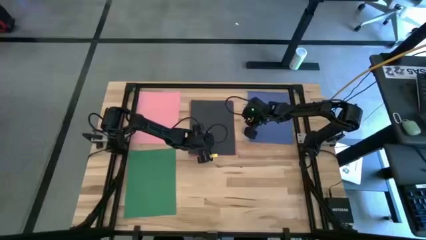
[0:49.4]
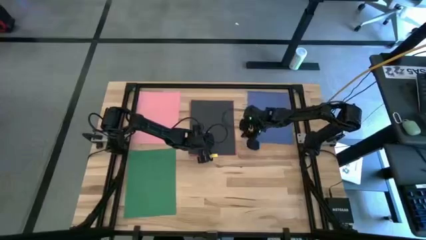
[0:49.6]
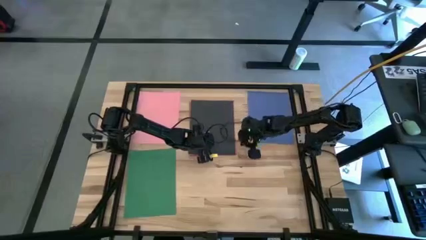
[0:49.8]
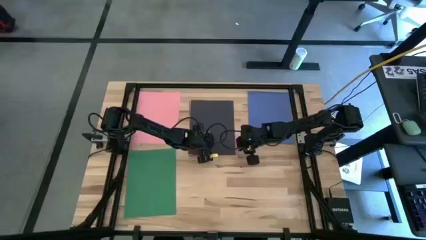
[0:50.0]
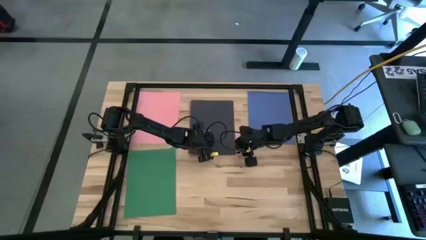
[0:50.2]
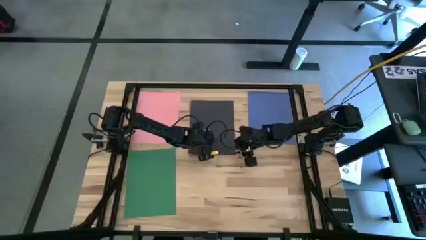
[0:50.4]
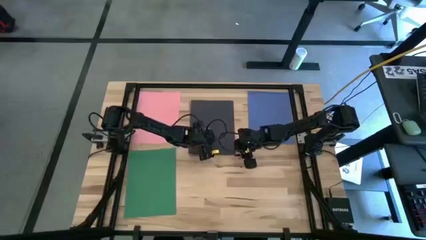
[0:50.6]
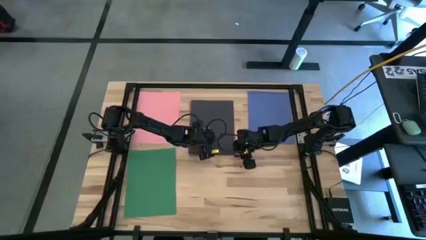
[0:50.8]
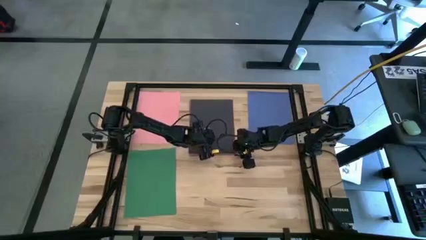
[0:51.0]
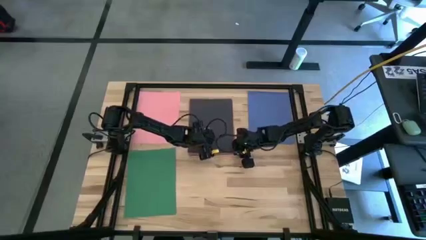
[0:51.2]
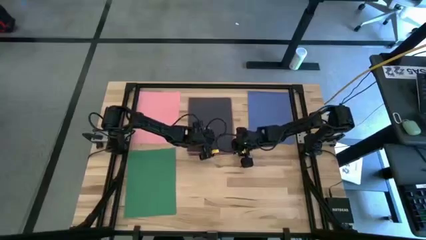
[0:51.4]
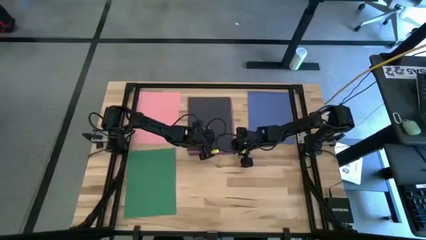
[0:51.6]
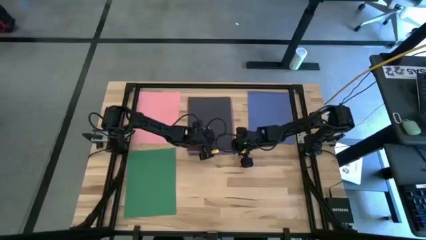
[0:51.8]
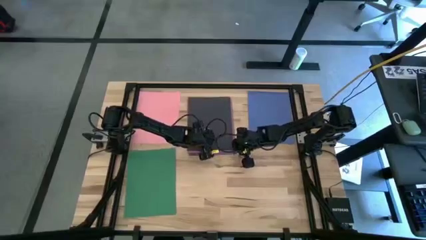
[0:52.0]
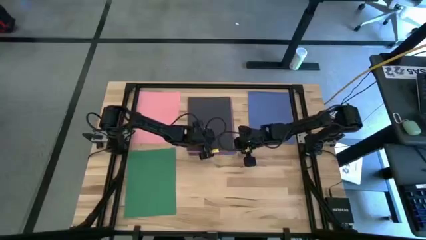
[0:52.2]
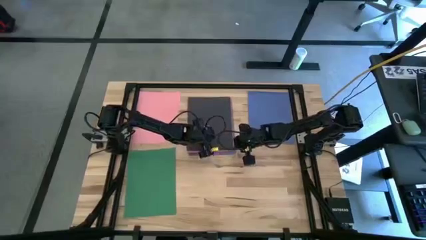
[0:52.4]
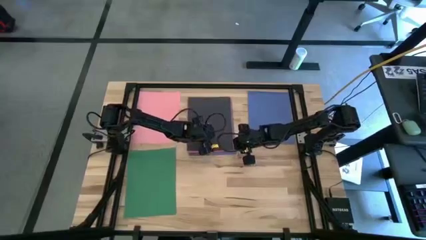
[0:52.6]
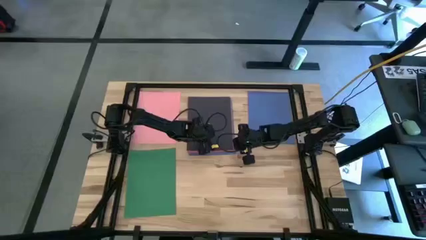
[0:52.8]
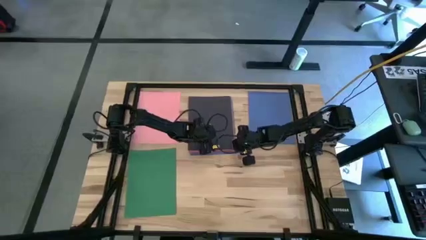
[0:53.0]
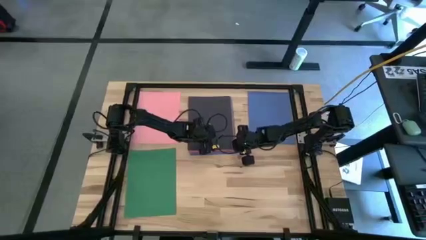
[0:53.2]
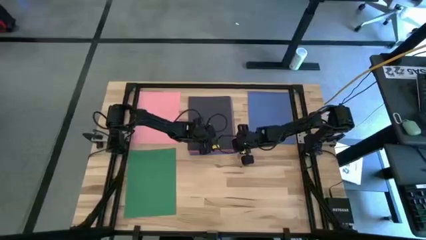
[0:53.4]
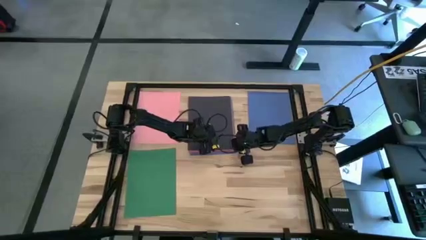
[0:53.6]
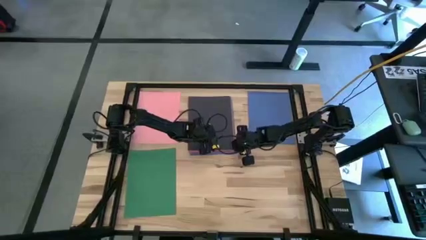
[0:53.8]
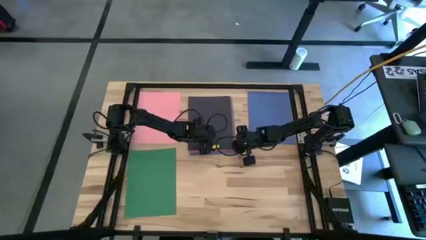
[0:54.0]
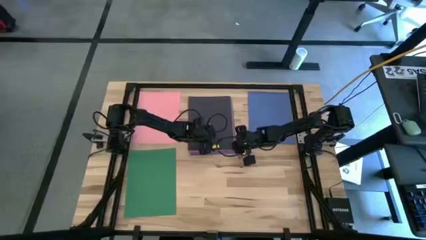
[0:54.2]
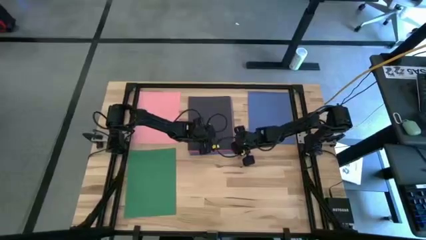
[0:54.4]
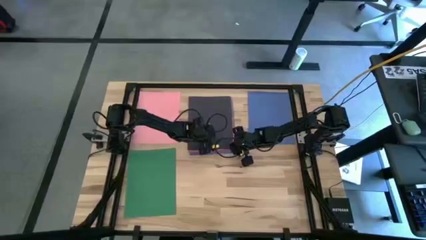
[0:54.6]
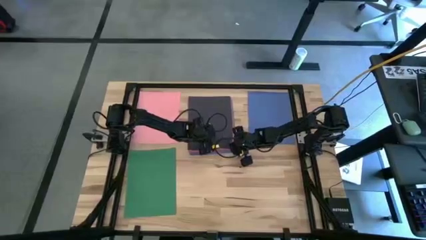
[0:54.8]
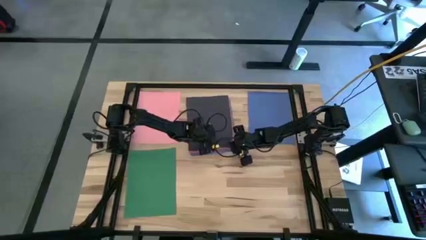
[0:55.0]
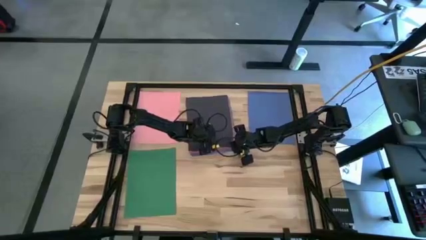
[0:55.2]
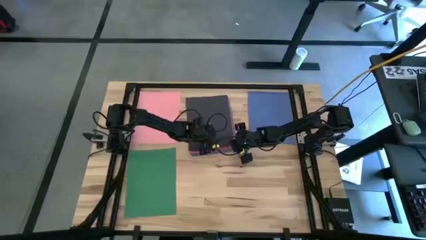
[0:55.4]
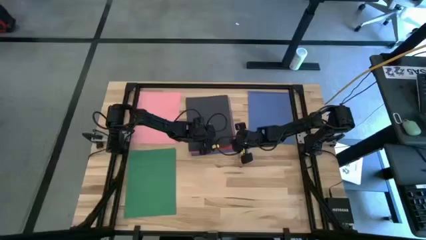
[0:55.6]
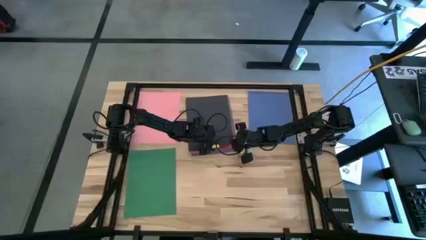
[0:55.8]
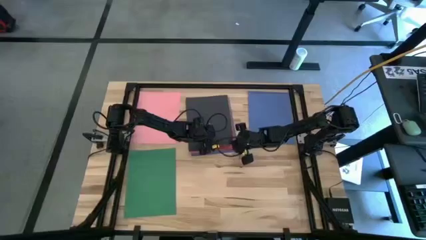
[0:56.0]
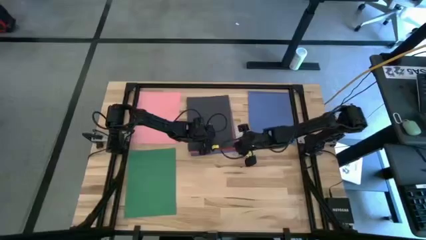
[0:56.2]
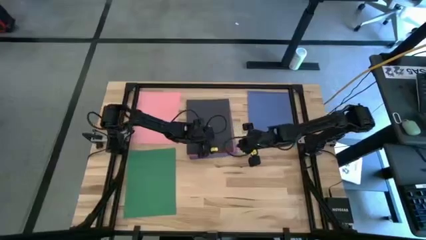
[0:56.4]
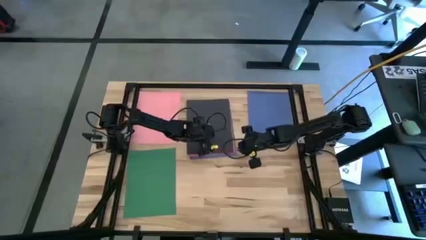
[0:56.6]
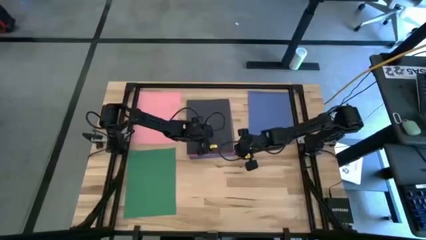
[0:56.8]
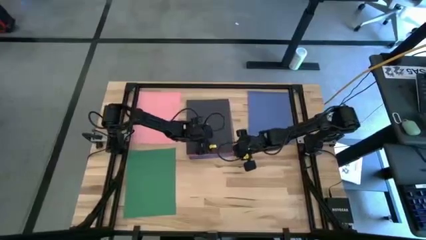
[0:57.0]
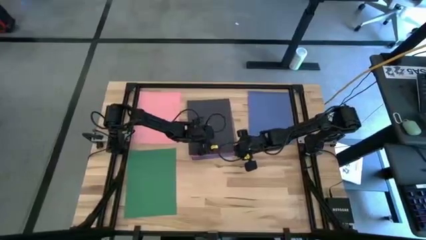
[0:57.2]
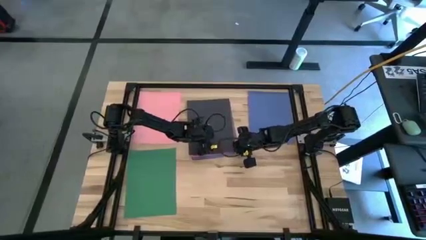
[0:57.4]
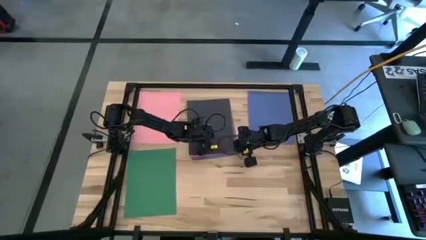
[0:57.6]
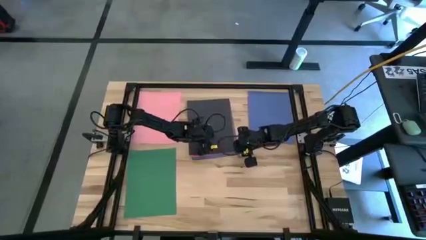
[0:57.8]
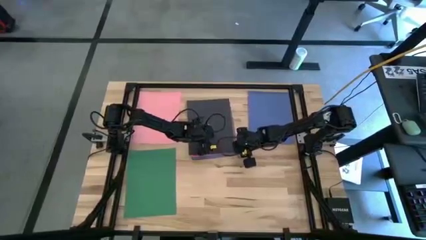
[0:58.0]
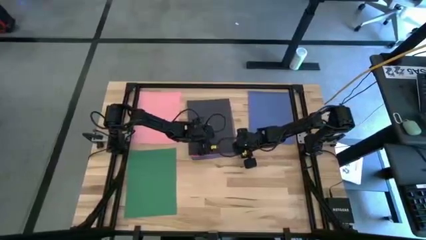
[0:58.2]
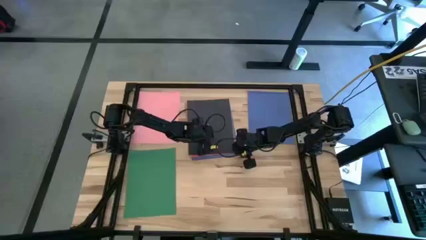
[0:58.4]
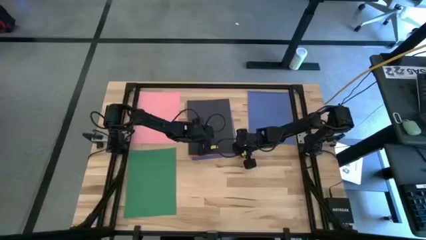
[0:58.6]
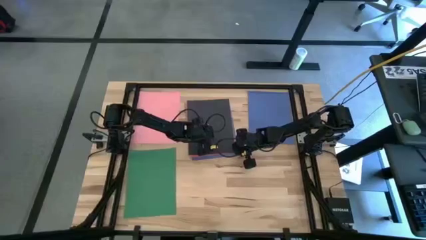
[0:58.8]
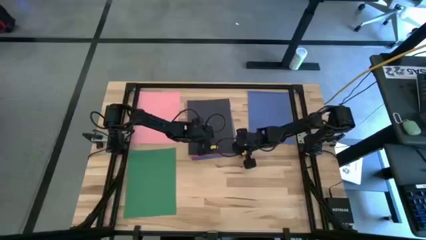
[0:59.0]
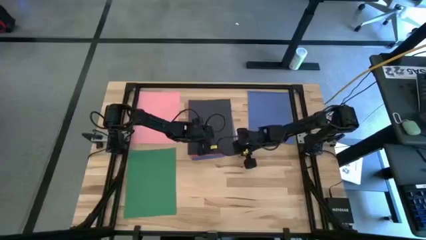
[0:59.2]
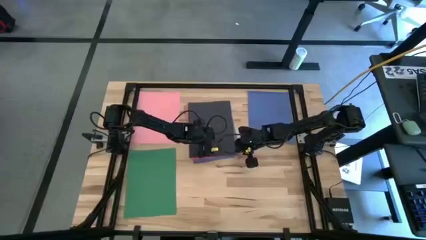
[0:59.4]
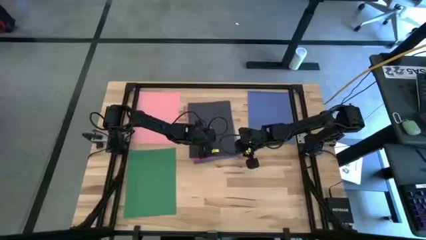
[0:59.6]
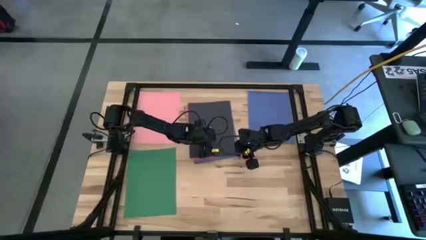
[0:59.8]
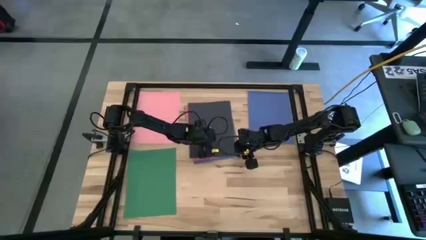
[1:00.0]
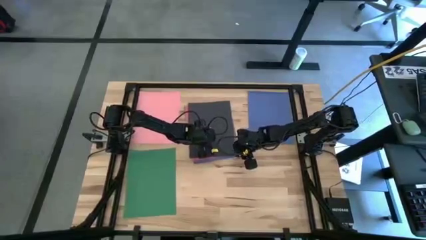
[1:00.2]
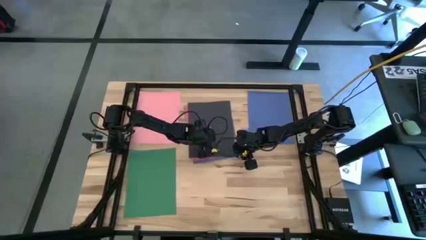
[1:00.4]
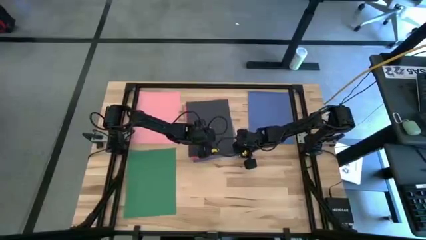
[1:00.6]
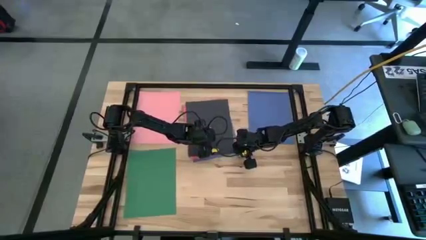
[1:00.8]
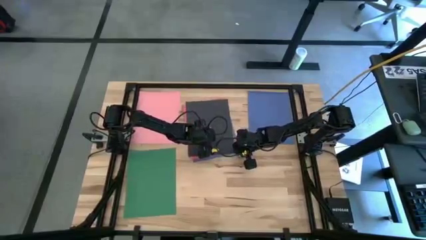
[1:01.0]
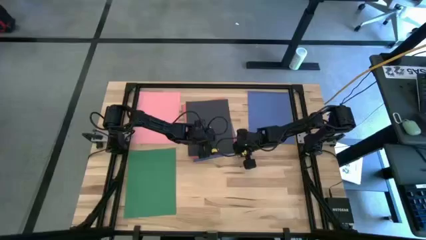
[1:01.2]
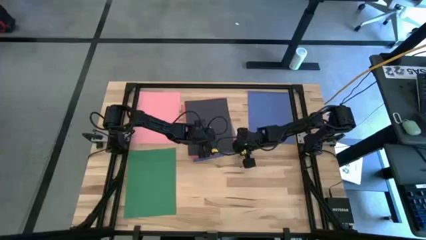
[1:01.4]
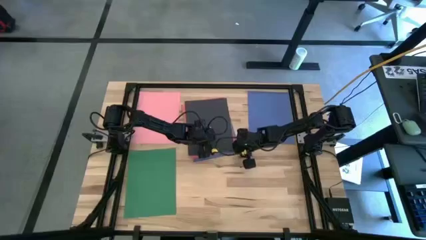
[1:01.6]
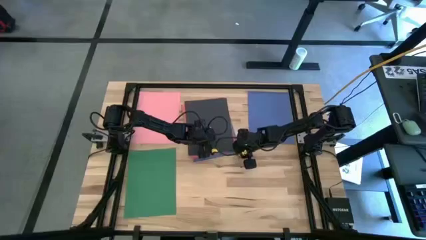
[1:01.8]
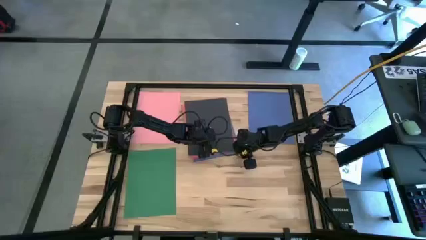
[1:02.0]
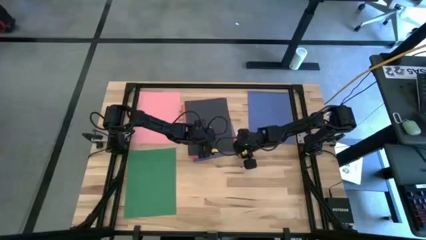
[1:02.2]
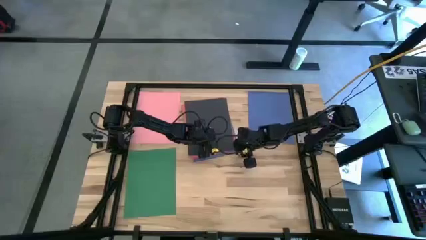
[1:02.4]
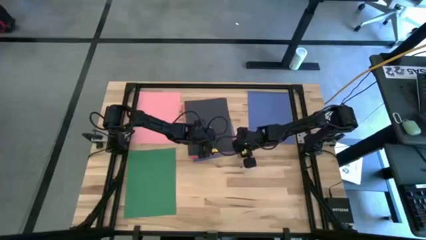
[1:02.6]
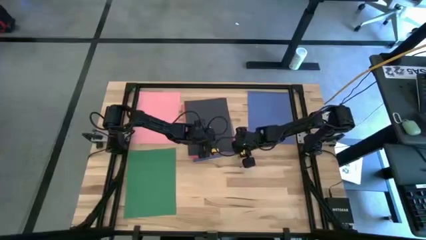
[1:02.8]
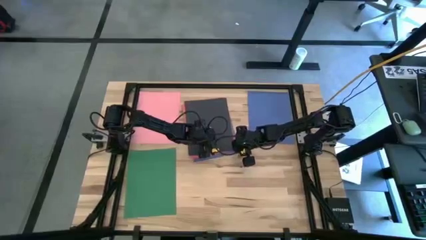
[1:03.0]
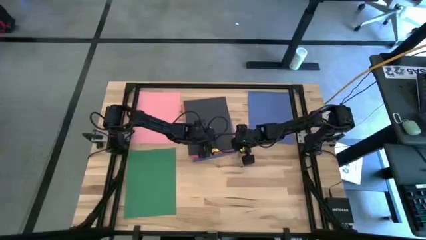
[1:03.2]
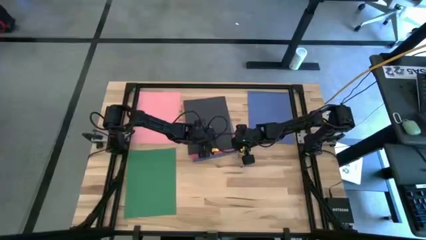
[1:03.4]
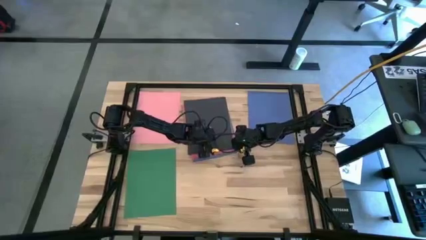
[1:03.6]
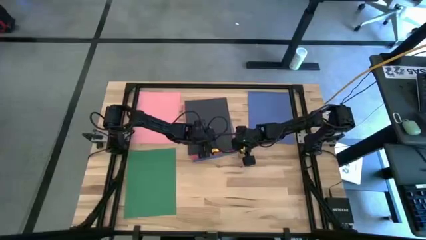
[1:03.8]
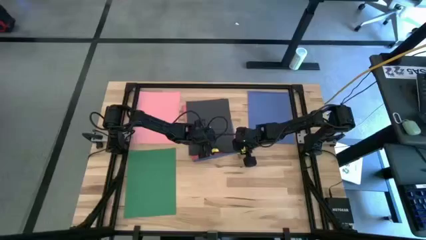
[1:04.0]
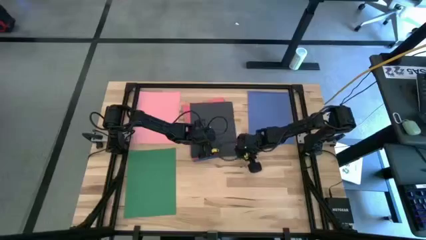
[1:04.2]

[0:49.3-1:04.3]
Task: Organize paper
Move the black paper to the bottom right of the table

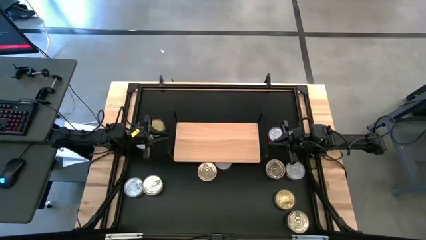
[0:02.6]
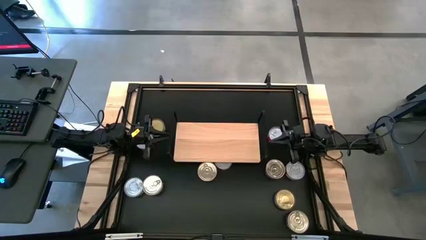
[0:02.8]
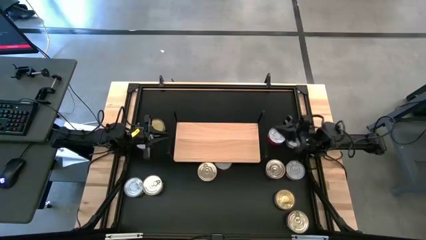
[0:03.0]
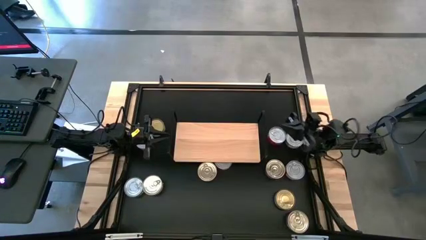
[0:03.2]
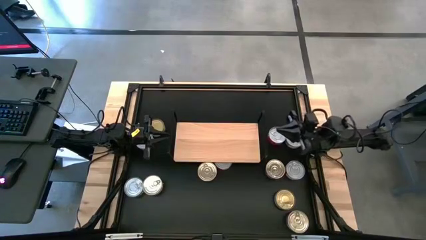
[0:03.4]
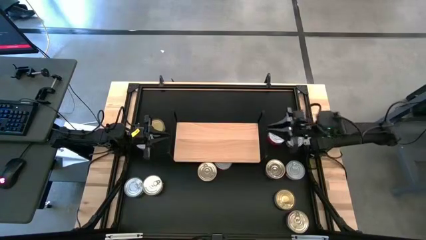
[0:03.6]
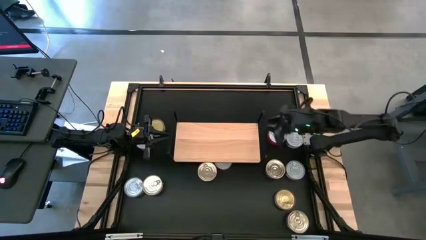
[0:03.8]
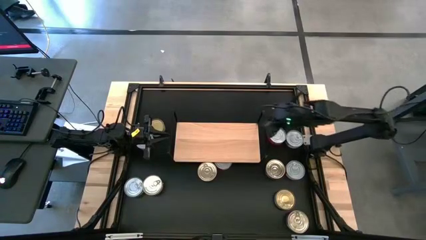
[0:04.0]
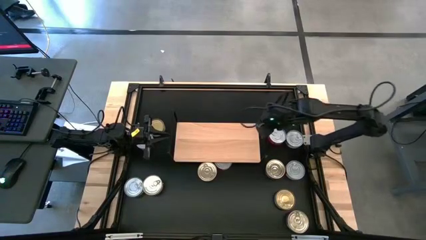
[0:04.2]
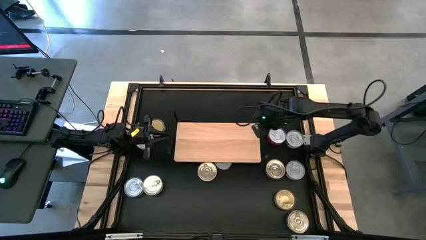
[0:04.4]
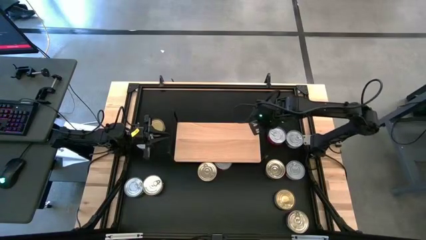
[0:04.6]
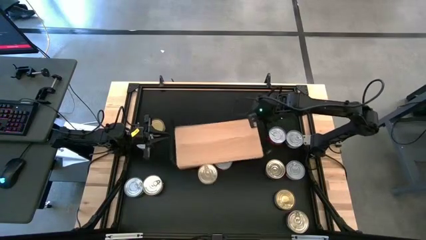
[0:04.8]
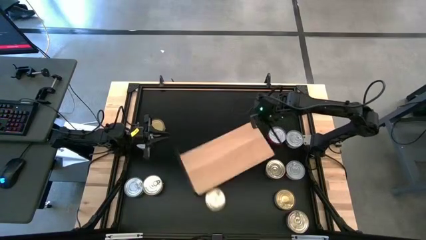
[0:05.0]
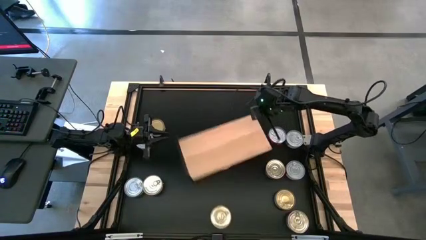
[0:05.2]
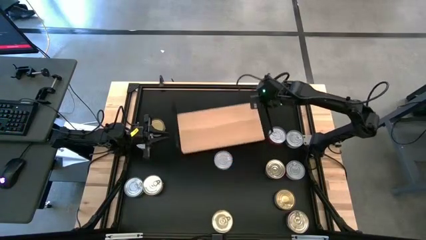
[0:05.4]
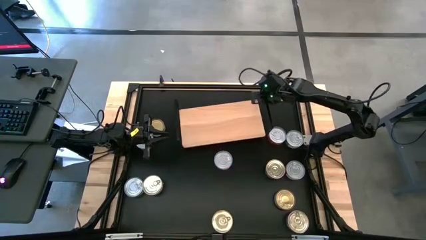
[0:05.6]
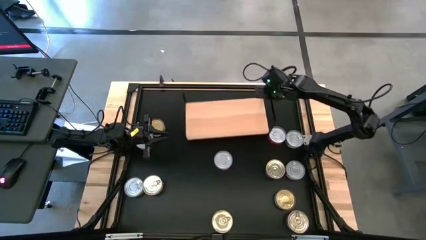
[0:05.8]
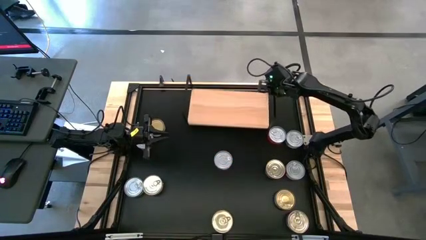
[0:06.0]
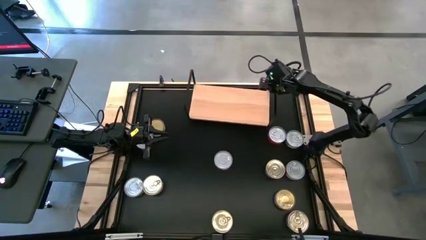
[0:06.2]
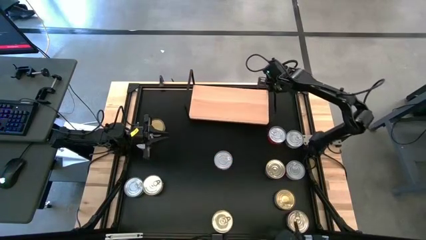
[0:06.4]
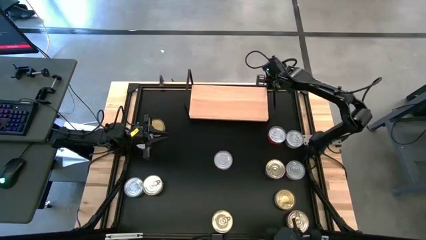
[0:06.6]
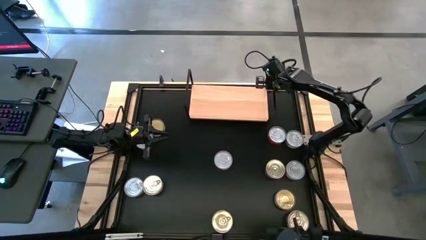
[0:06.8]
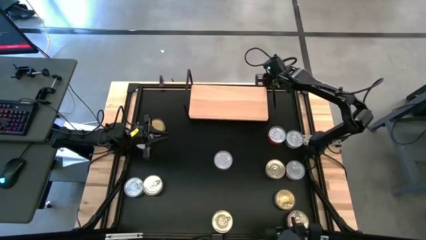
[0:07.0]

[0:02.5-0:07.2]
Task: Stack canned seafood by type on shelf
Move the shelf to the top of the table
